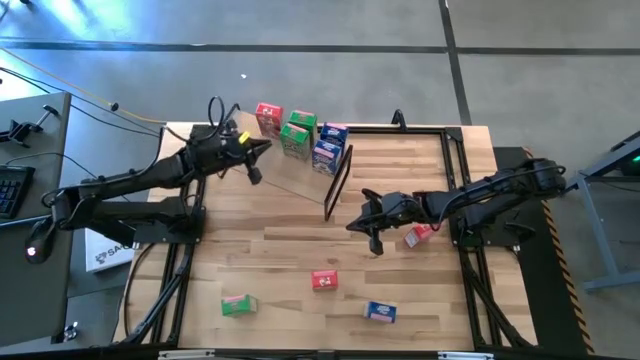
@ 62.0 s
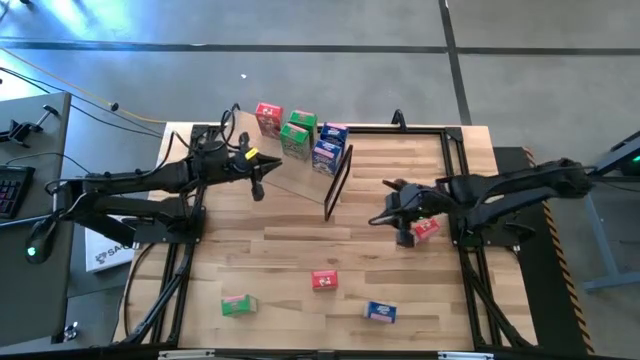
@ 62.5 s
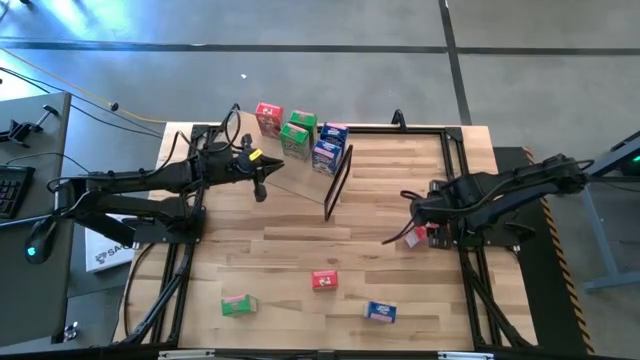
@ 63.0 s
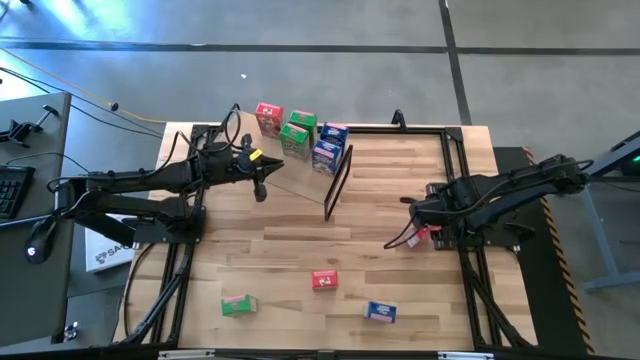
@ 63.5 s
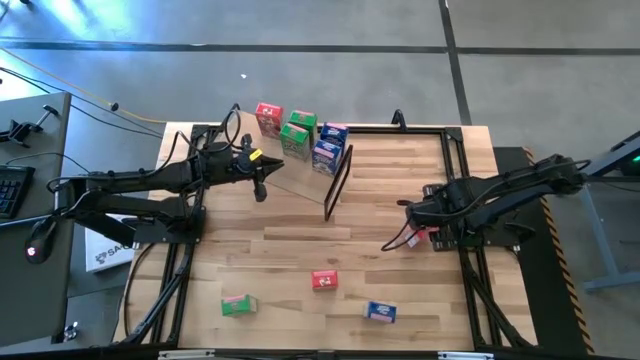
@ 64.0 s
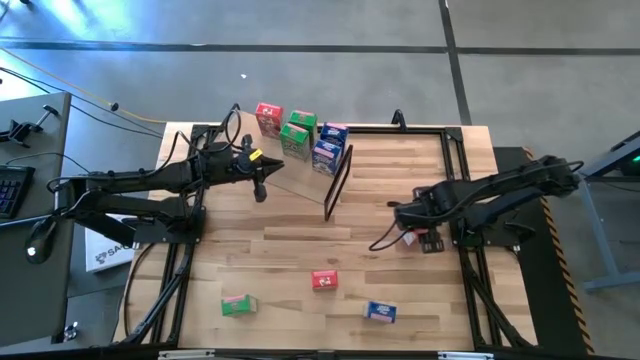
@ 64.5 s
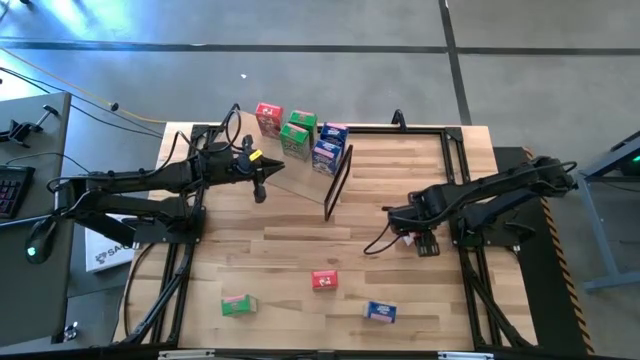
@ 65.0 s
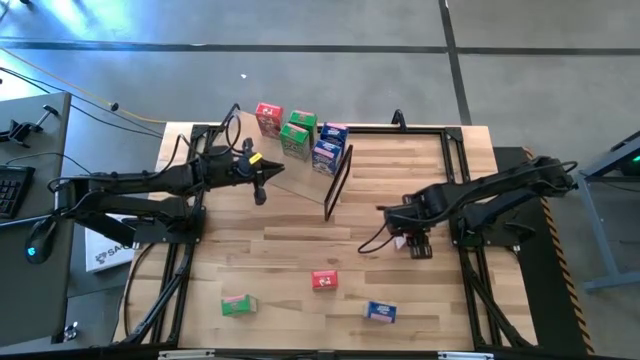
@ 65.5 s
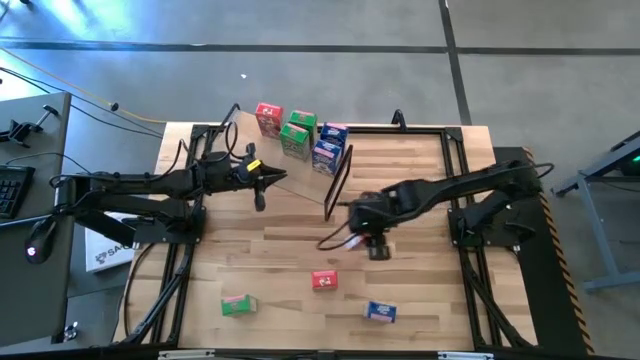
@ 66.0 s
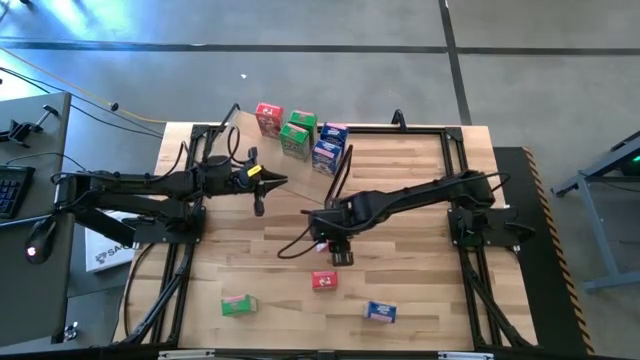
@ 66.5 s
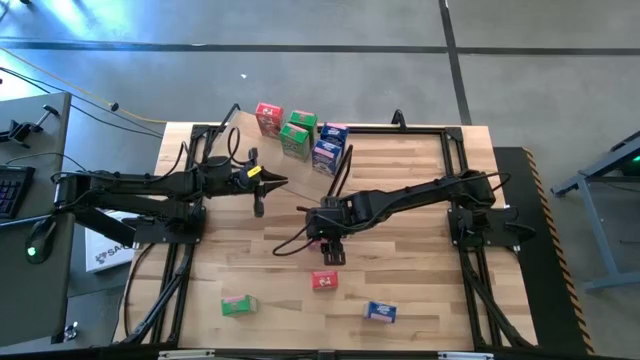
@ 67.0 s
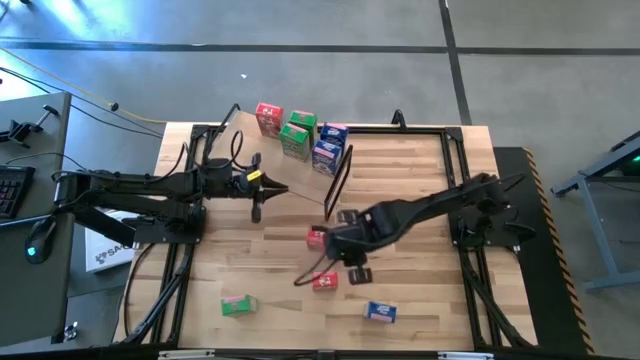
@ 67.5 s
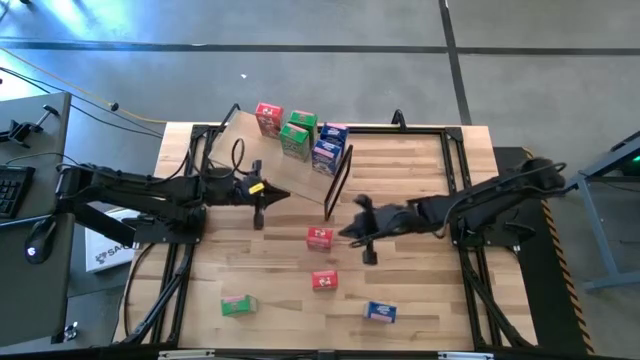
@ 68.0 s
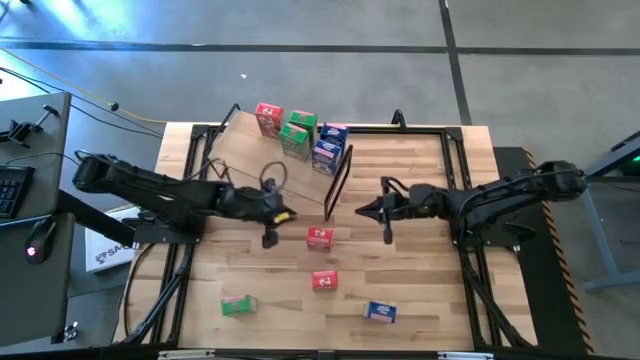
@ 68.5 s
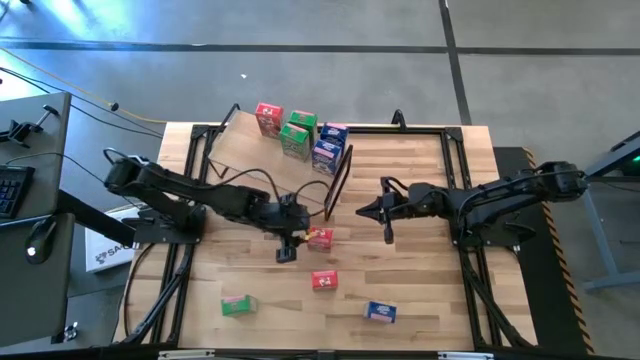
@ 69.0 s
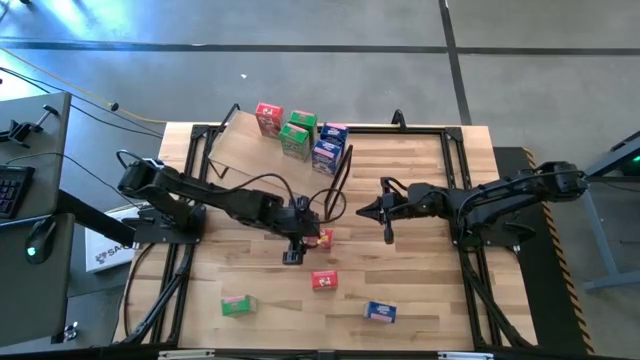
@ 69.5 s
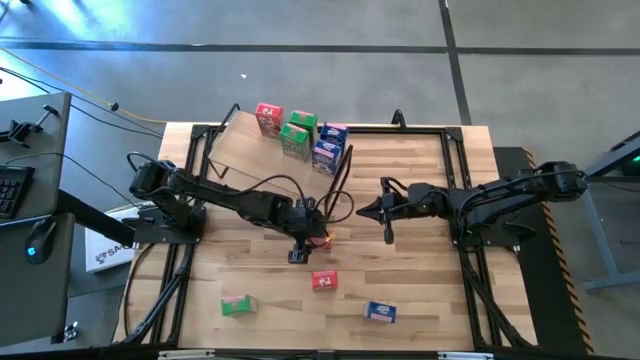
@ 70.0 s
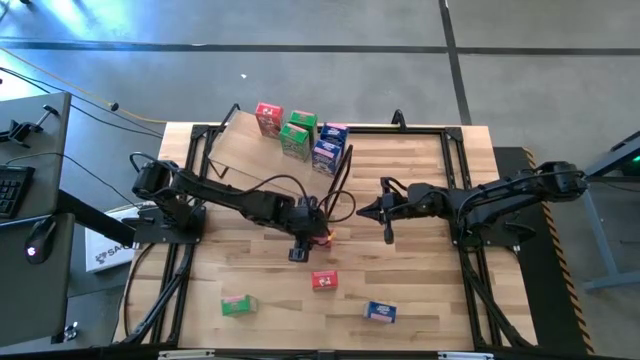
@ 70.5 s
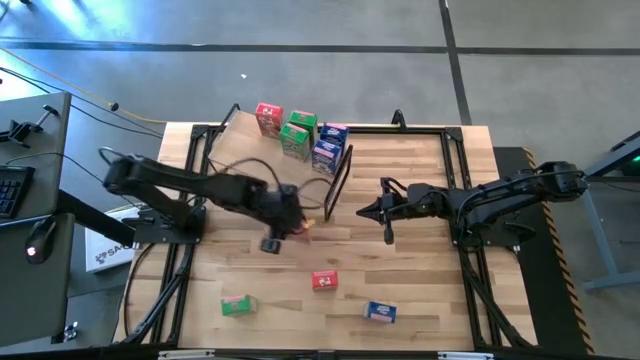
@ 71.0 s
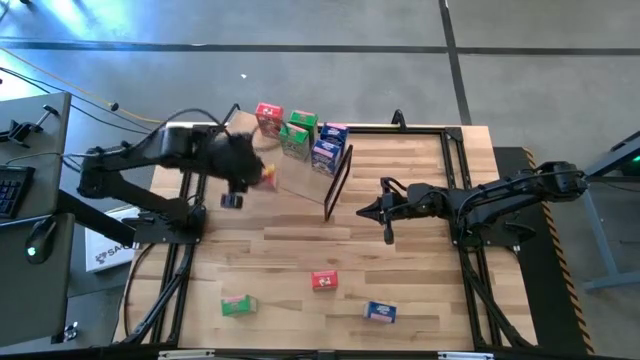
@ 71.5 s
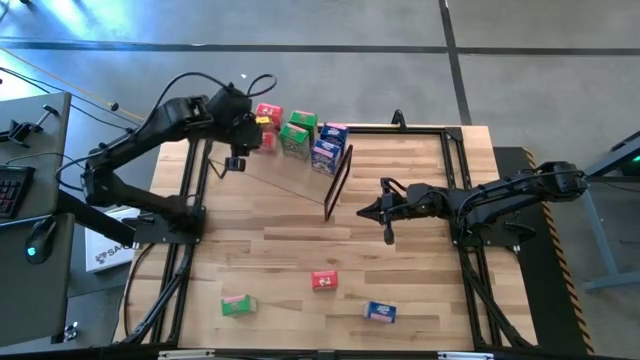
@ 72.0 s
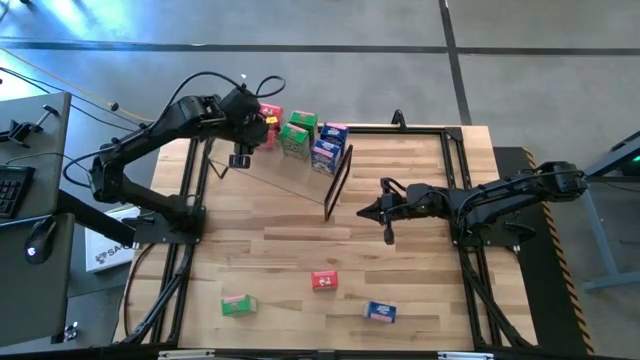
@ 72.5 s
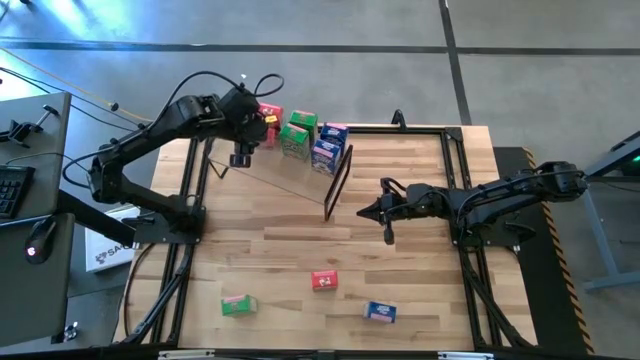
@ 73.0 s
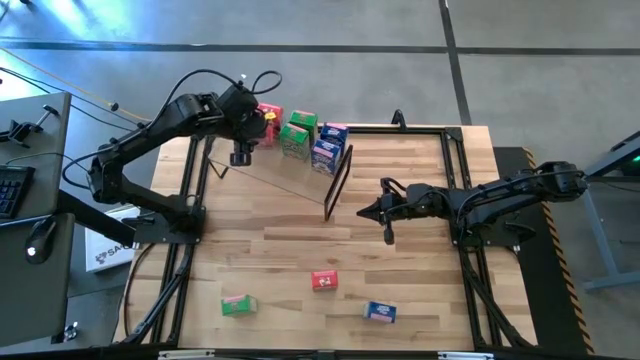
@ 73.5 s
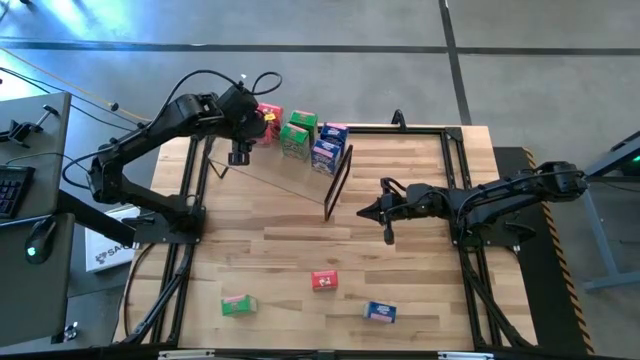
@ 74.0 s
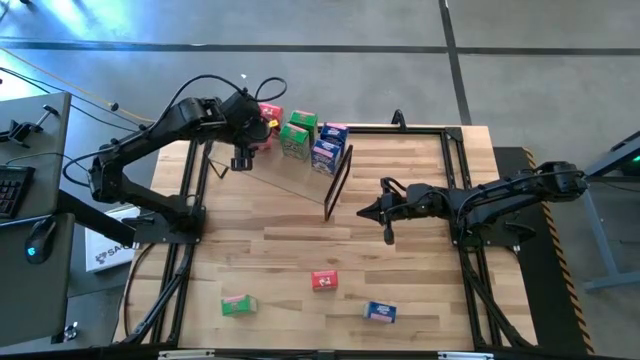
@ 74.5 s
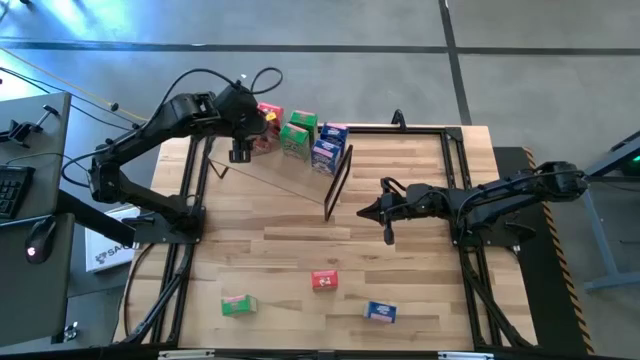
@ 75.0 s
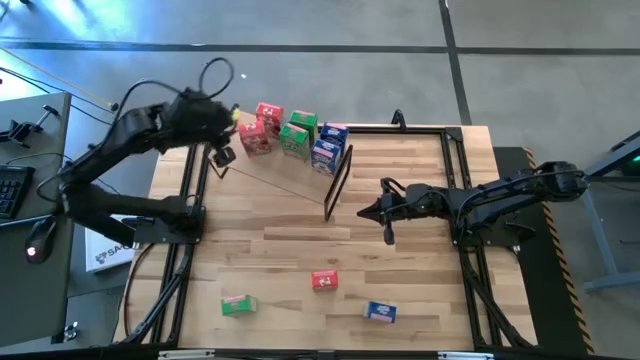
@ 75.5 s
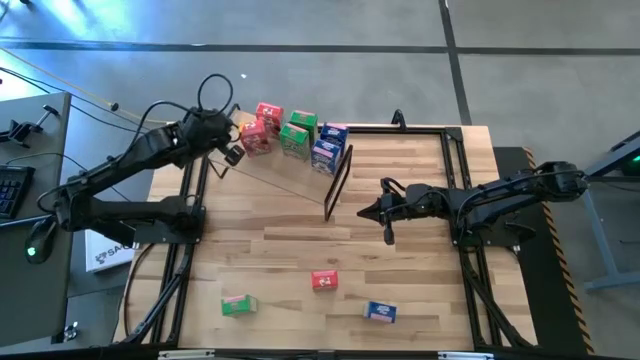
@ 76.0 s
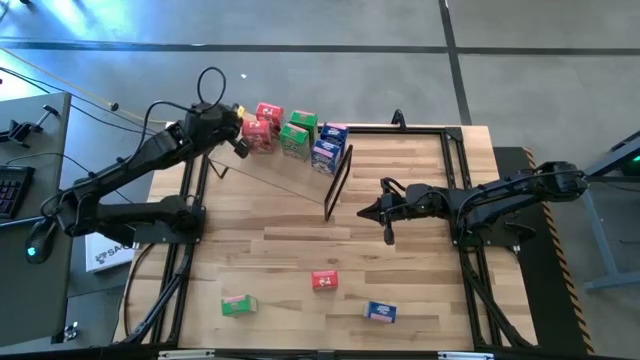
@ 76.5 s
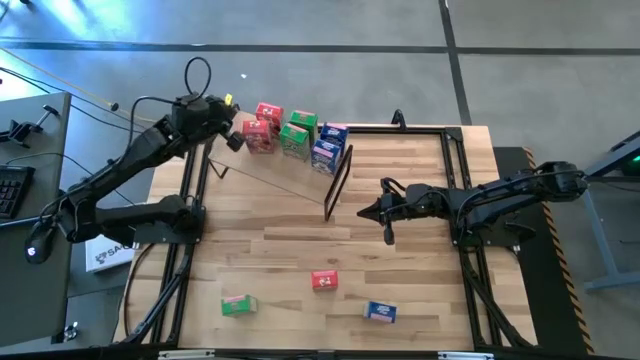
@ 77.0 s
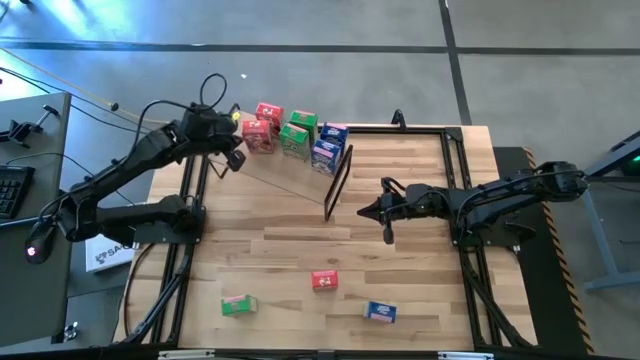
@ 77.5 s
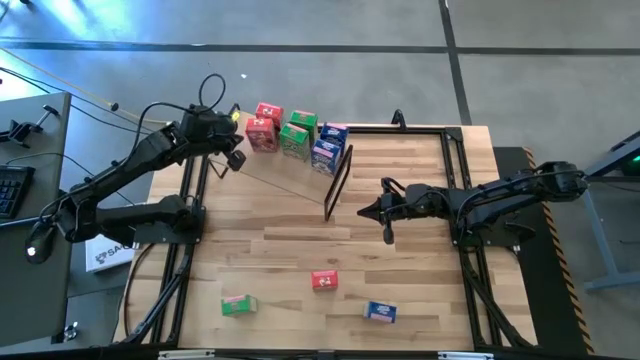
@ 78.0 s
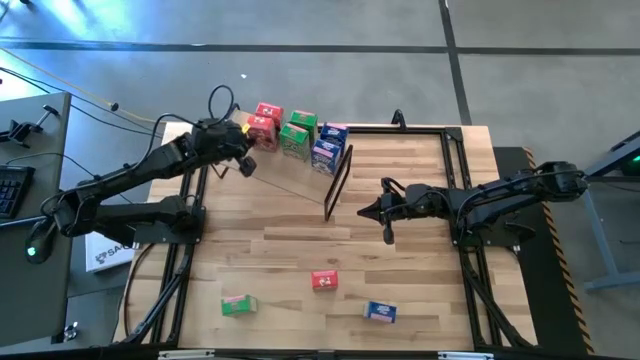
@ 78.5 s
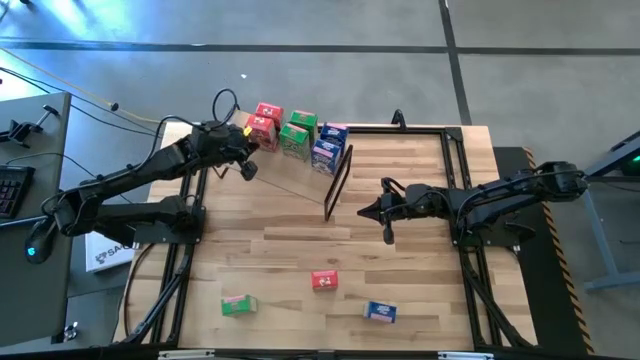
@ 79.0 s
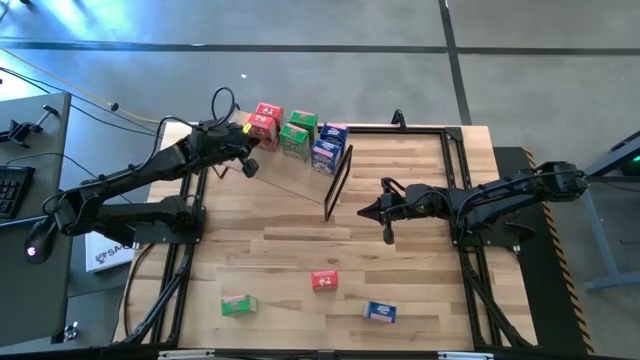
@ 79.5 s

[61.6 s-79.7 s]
Task: Stack cereal on shelf
Put the top red cereal box on the shelf aligned with the other red cereal box

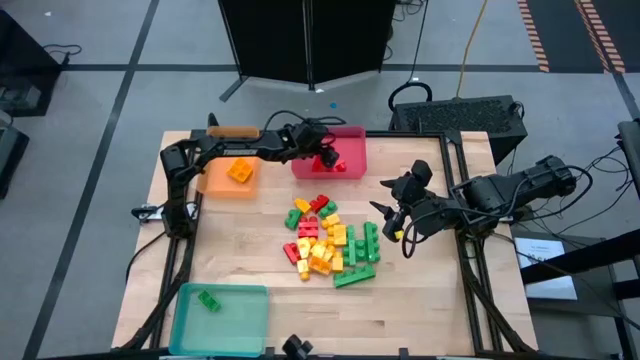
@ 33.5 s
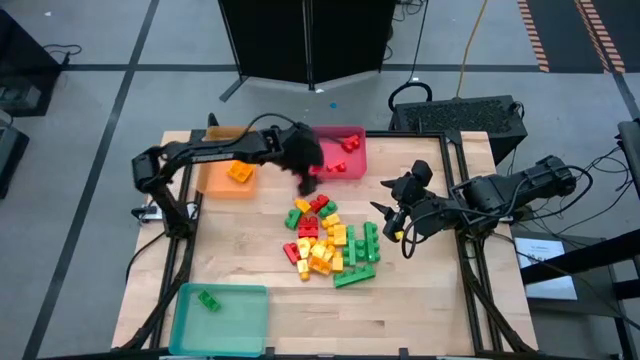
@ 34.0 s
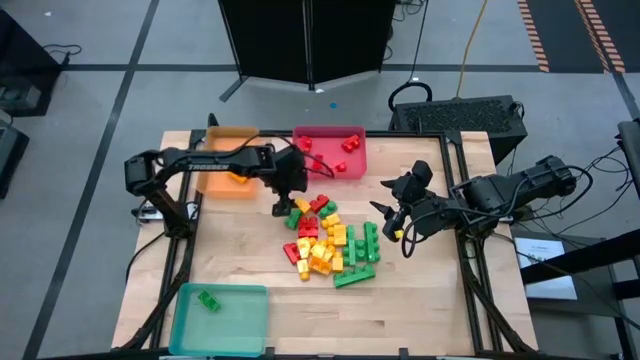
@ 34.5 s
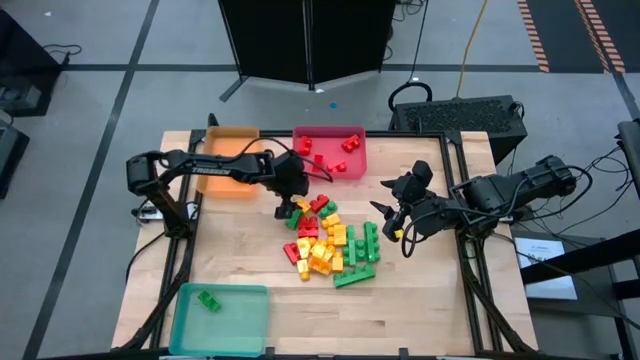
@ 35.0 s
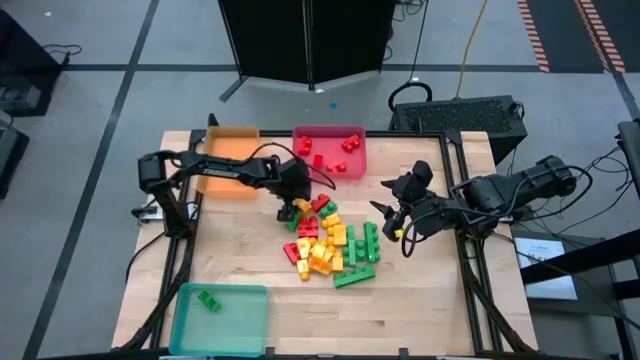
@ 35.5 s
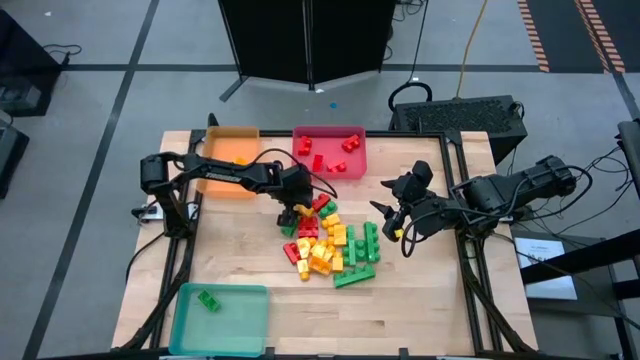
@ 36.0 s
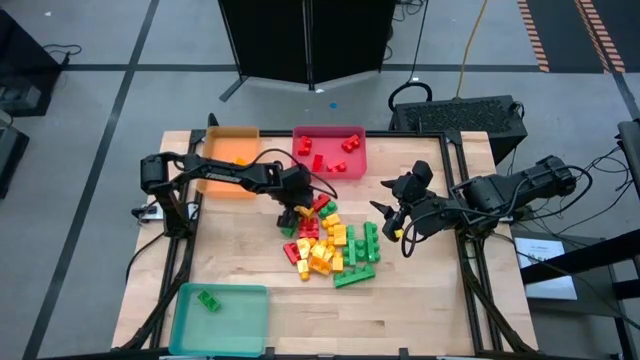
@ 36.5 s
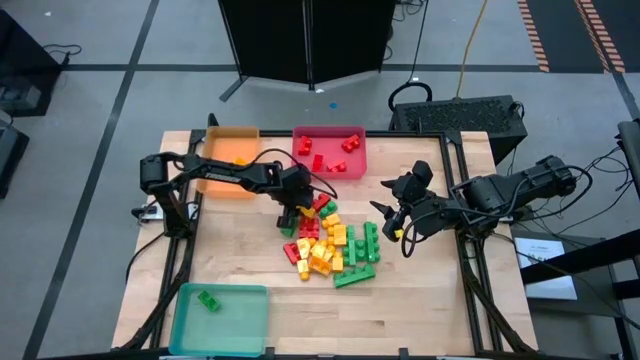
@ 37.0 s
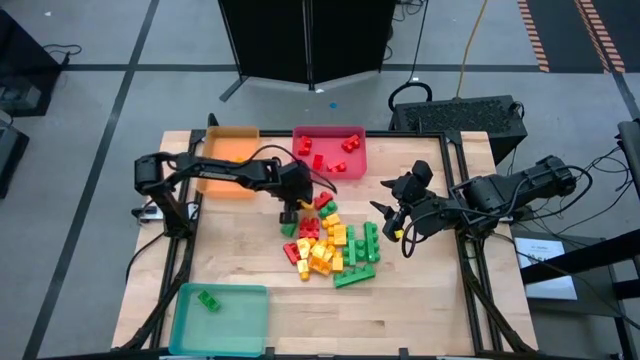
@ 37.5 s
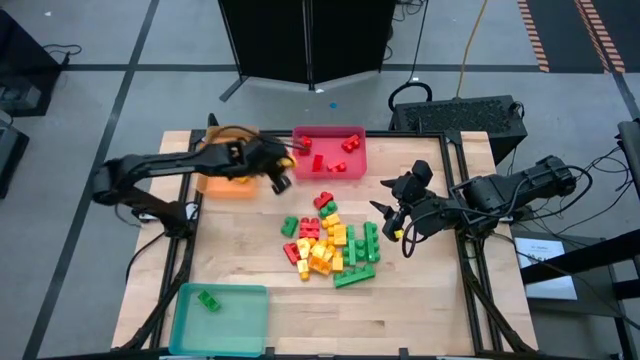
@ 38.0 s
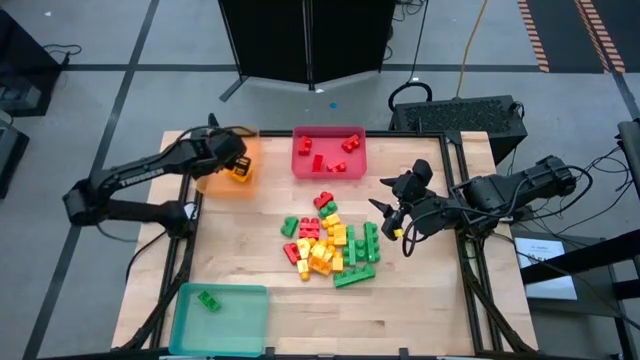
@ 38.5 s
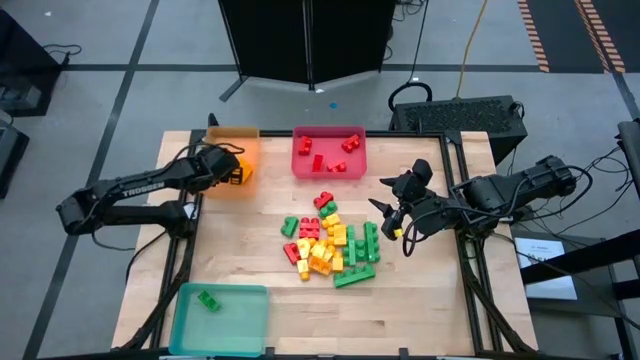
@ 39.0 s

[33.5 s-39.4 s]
Task: Sort blocks
Put the yellow game piece into the yellow bin
